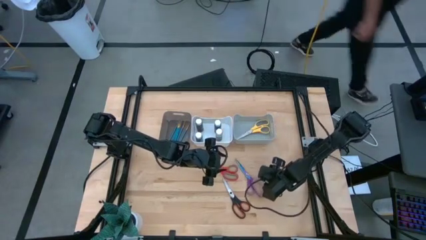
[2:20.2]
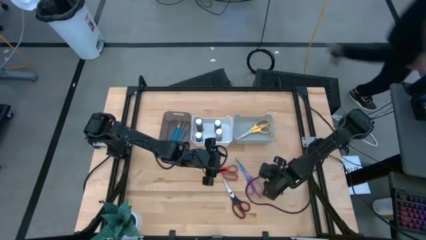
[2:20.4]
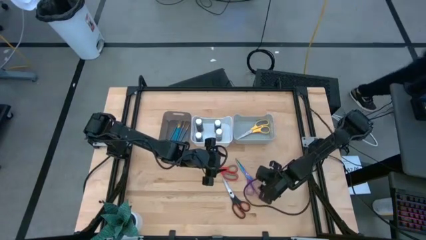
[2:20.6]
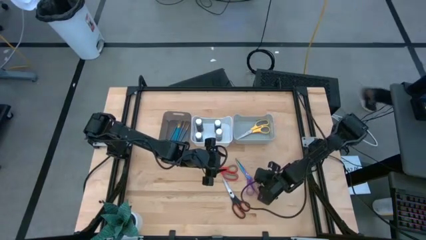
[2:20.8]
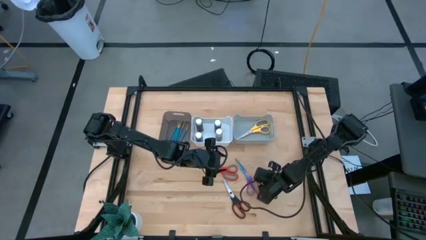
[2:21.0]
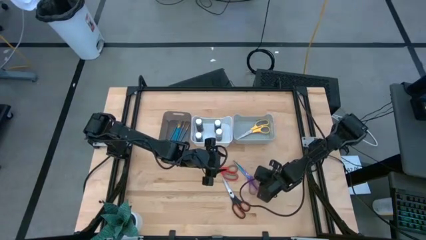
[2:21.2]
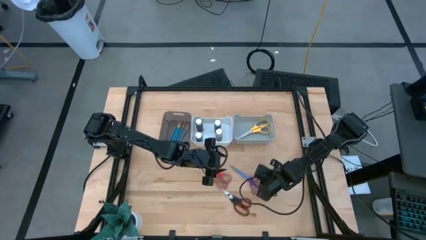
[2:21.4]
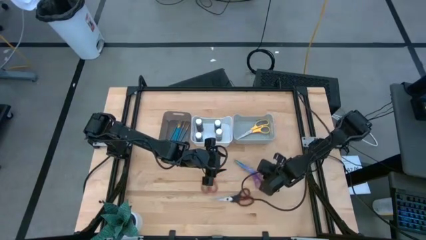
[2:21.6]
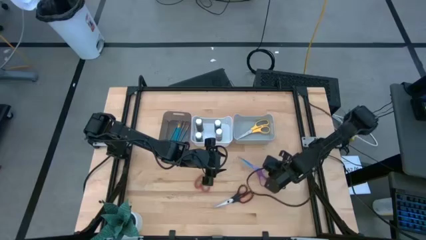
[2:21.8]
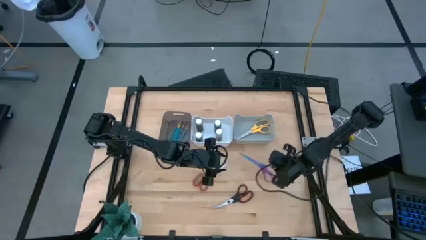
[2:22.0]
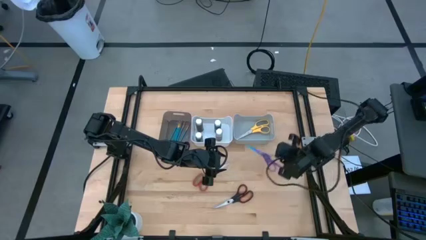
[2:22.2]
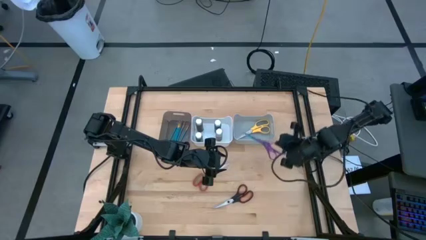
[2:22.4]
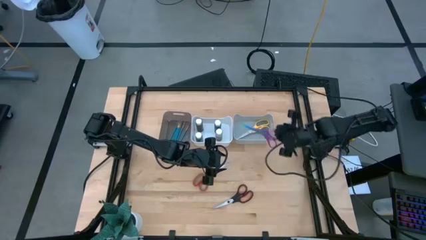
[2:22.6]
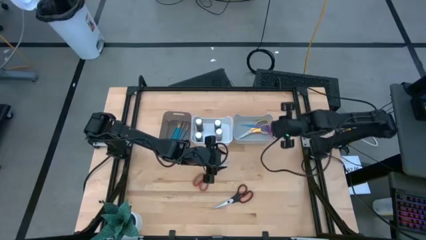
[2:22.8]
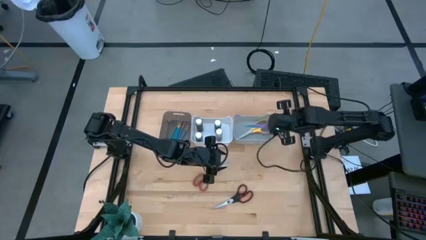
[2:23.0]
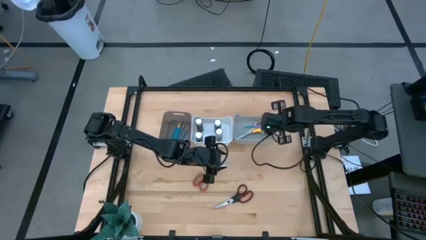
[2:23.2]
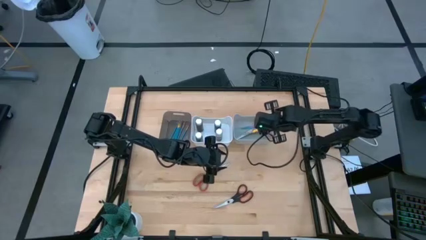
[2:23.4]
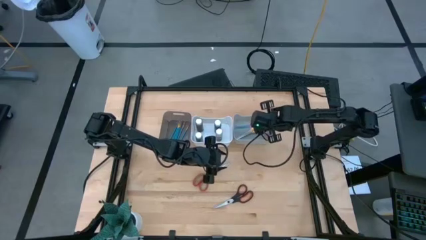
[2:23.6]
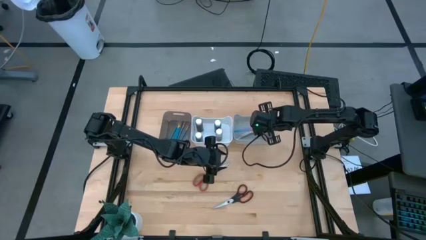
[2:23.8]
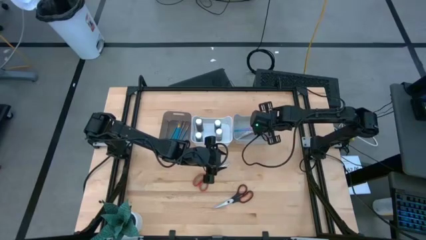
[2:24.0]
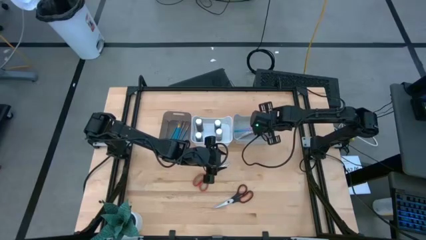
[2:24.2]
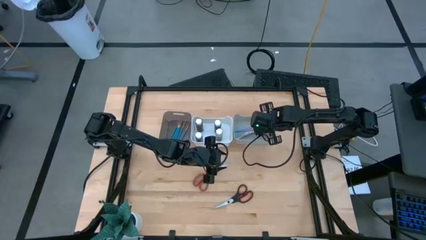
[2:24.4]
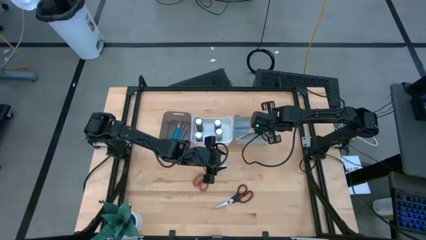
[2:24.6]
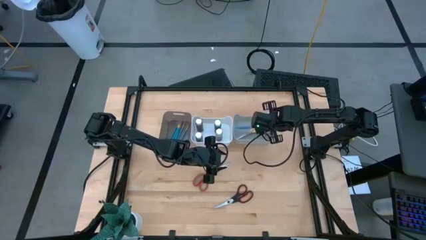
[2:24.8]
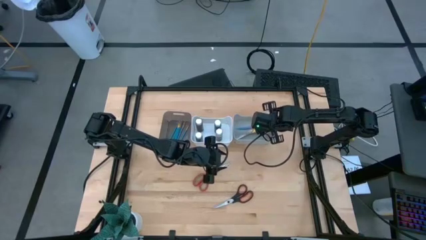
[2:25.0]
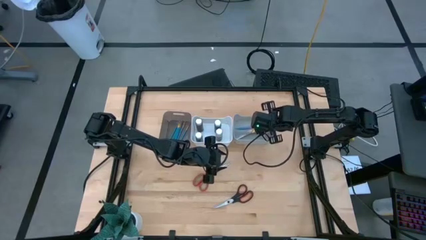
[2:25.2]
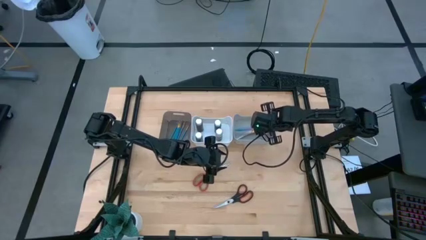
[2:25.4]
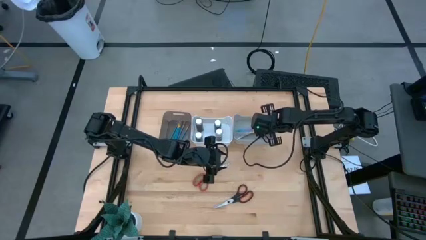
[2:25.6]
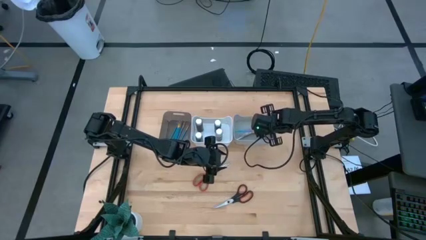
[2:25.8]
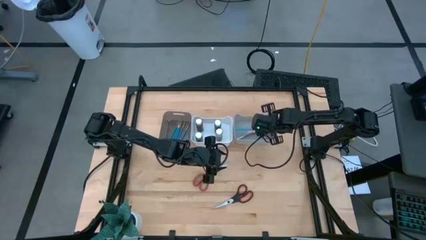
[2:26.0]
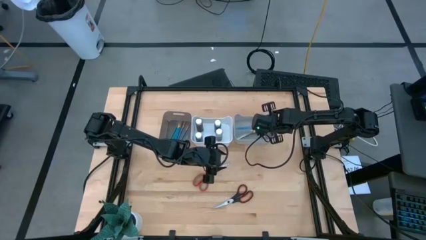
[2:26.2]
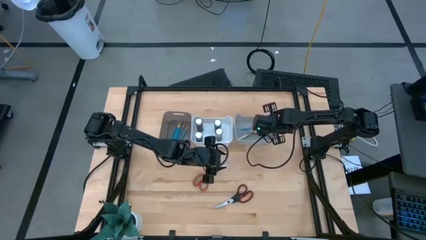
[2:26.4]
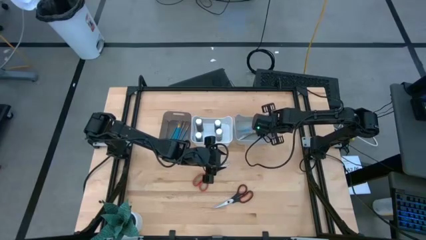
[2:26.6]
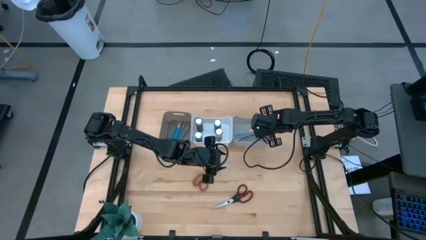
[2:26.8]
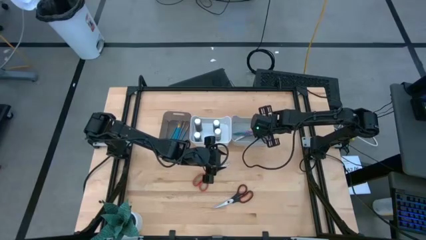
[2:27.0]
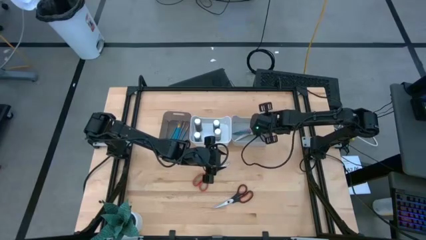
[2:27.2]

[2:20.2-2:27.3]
Task: Pick & Place Paint Supplies
Put the purple scissors into the gray bin

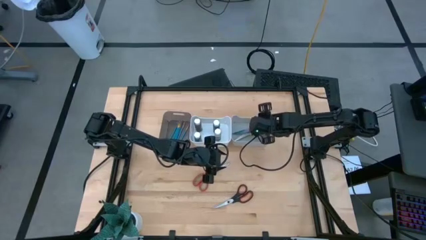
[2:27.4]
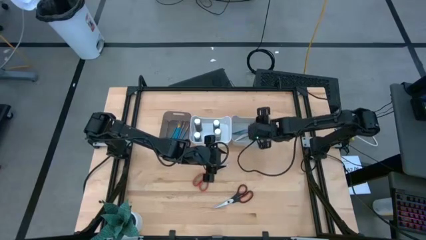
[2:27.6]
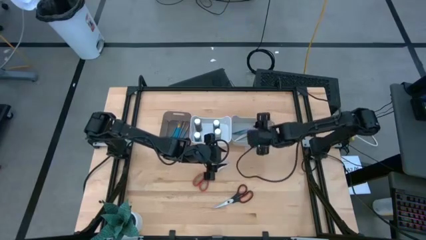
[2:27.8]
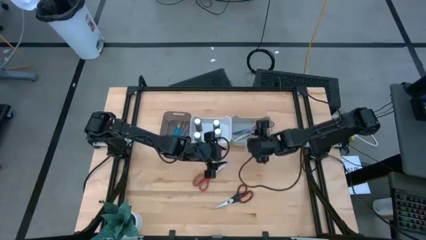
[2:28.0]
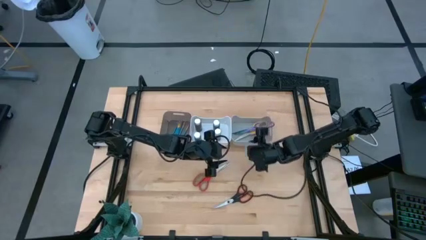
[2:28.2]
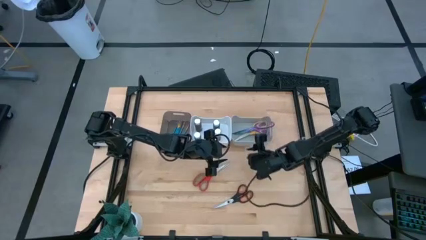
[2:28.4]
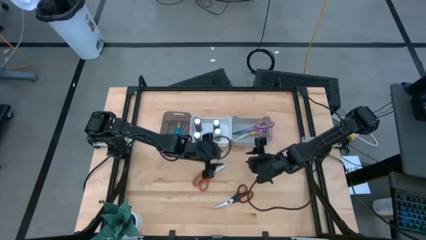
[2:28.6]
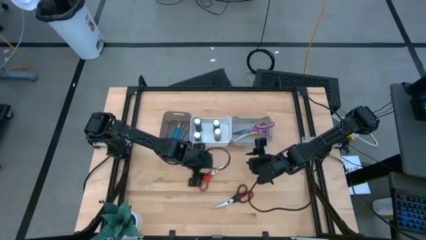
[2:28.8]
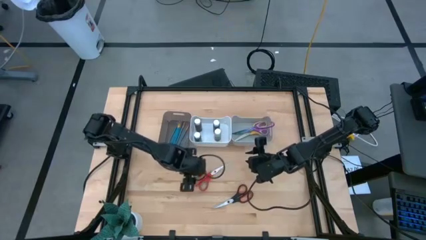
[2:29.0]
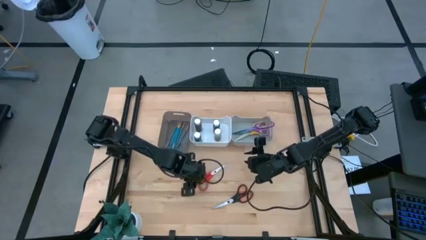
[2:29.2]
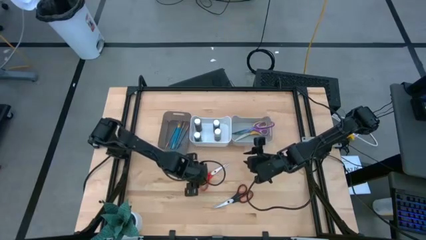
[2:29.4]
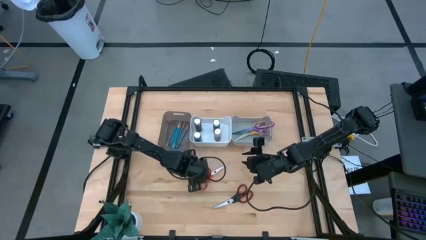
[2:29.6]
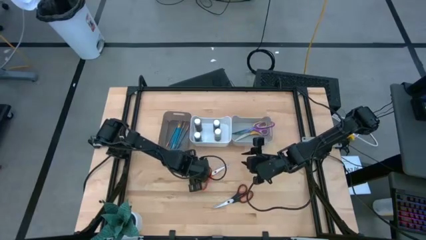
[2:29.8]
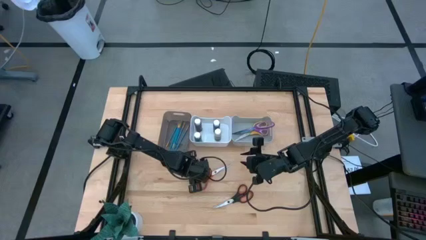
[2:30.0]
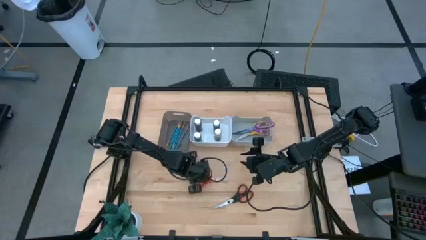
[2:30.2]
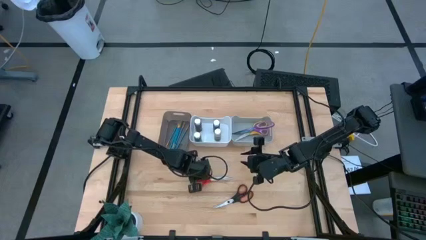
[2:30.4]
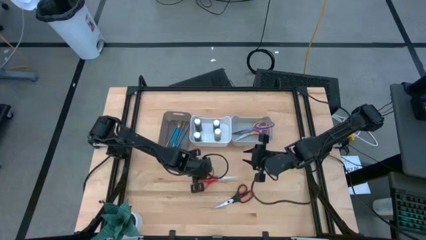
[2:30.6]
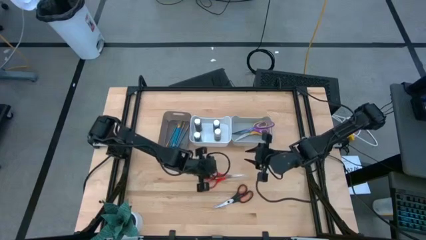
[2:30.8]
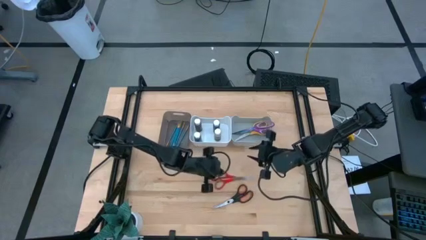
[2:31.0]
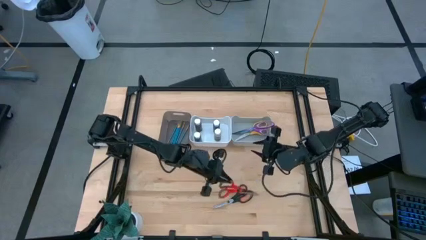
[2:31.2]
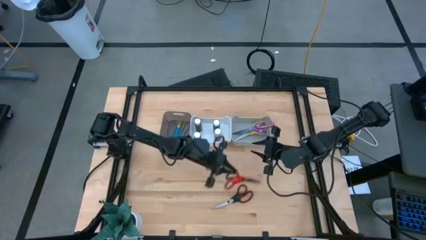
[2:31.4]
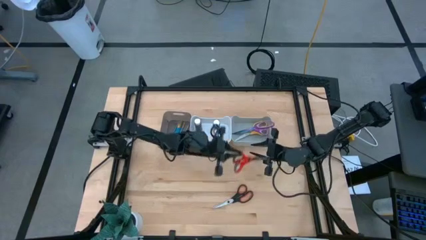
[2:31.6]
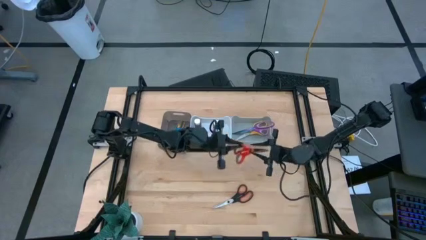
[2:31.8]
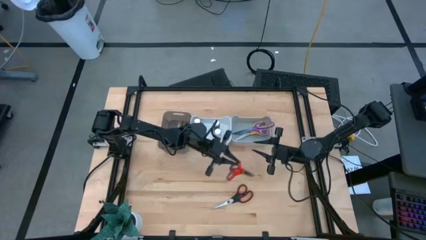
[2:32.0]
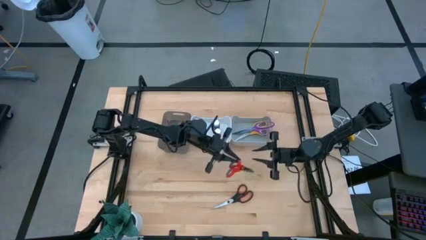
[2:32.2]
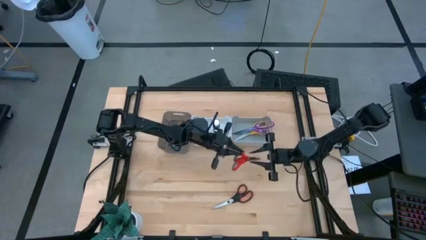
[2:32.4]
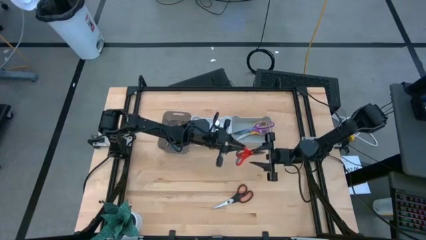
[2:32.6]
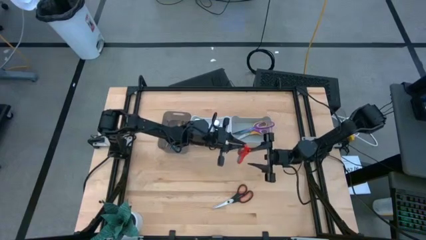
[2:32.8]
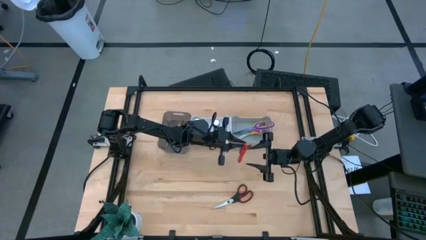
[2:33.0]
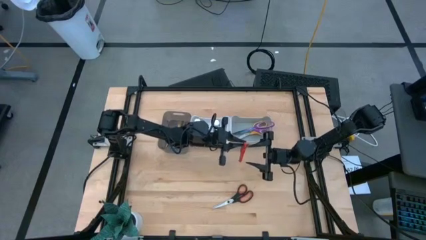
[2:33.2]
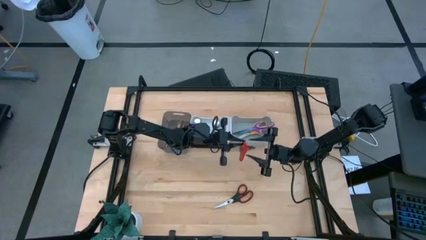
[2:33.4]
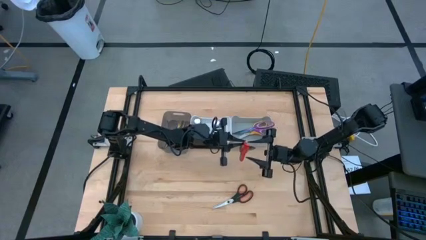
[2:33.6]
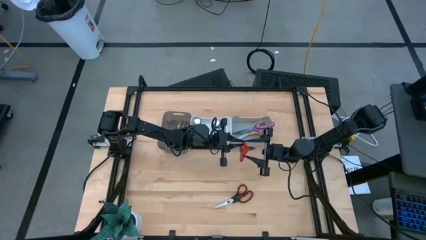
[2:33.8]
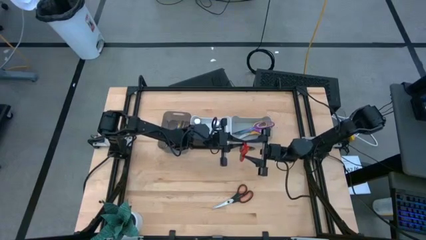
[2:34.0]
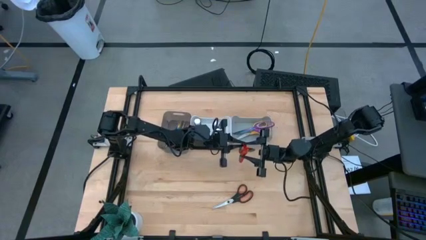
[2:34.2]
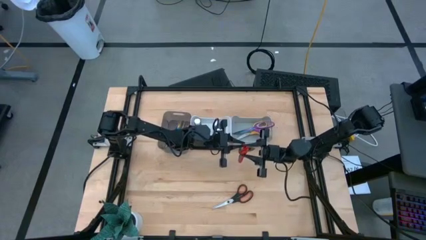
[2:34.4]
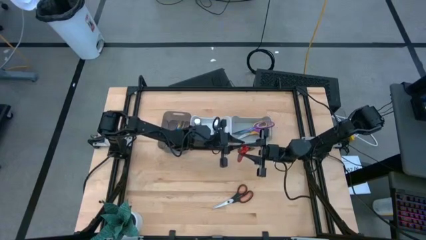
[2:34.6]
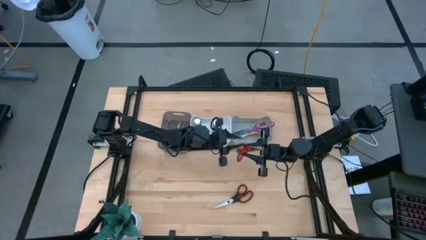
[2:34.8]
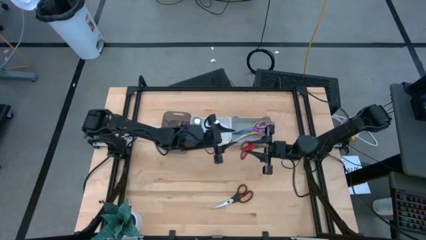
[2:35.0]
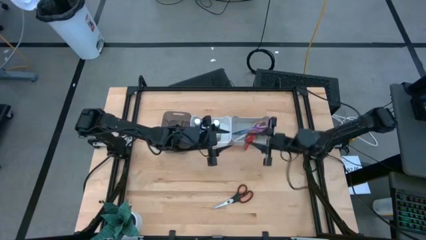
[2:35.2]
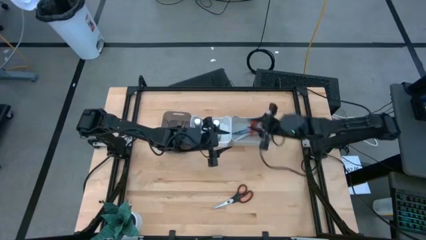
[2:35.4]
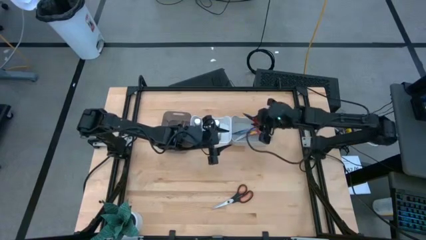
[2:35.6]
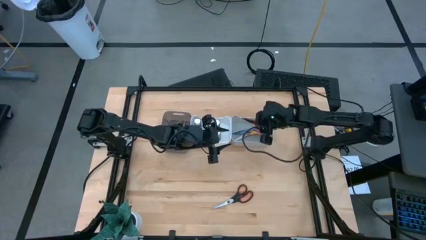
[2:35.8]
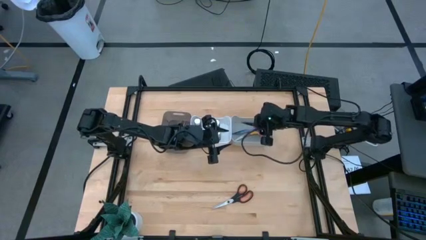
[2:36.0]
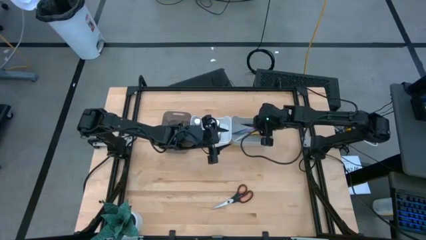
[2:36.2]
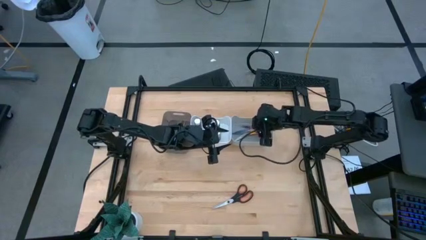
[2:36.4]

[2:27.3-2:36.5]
Put the orange scissors into the gray bin

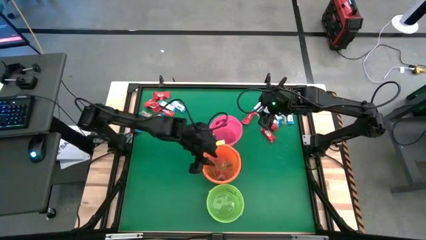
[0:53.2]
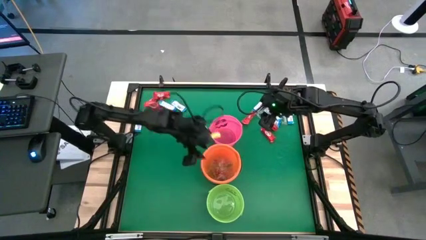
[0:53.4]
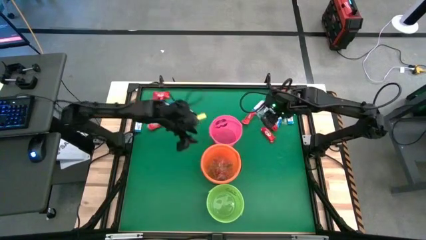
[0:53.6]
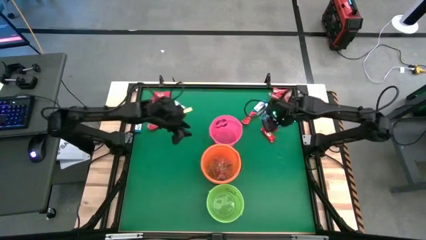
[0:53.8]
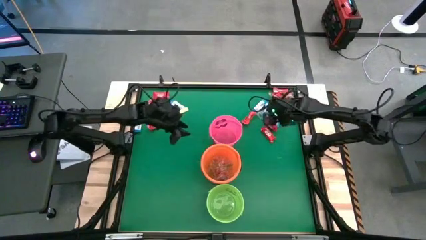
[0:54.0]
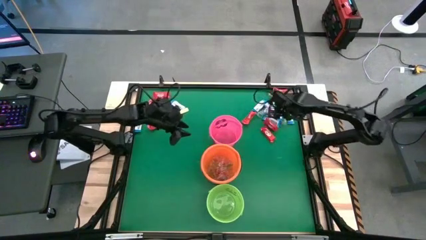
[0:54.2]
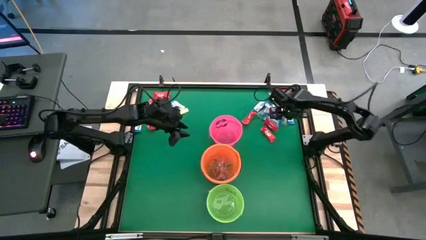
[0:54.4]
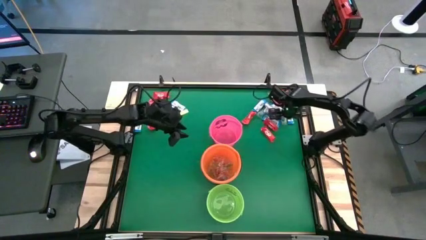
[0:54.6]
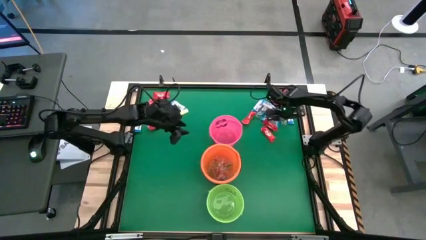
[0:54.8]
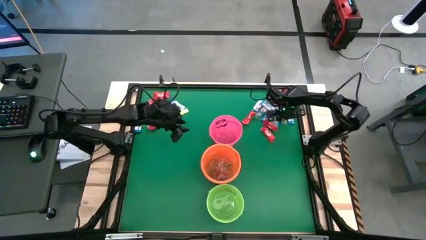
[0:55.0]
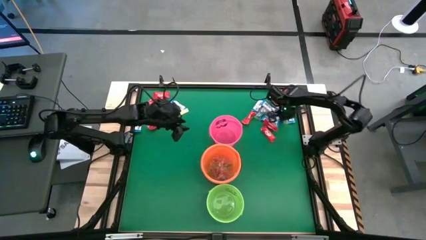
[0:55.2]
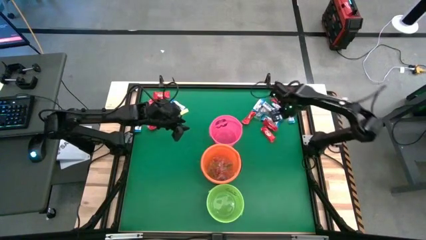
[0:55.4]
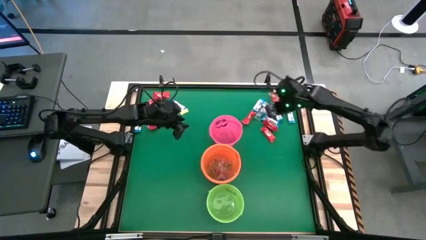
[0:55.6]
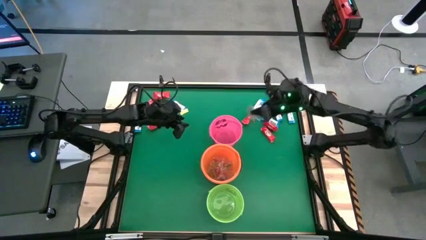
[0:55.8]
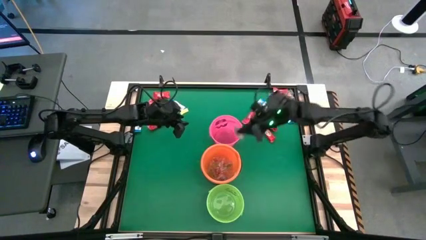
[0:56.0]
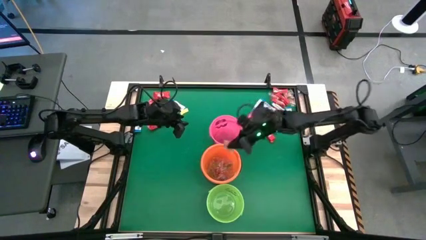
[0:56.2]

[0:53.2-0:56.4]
Task: Sort candy by brand, put in halloween buckets
Put the green gummy into the orange bucket
